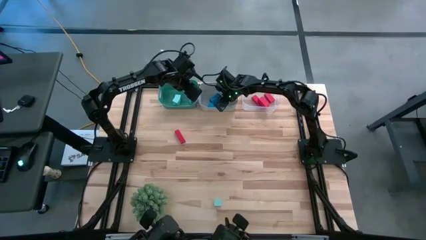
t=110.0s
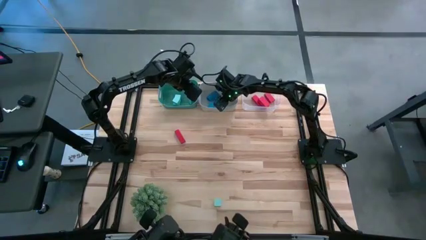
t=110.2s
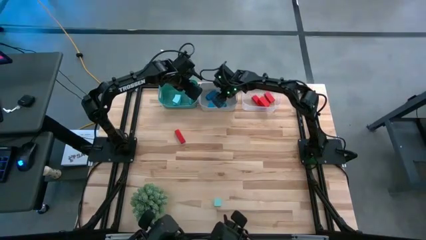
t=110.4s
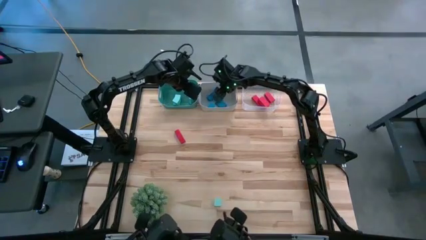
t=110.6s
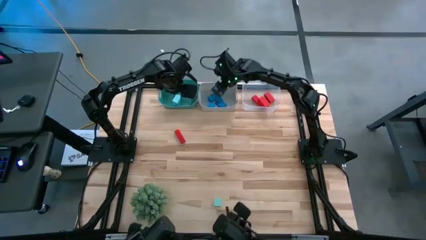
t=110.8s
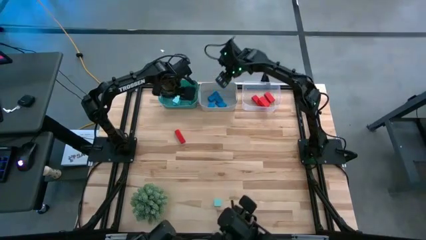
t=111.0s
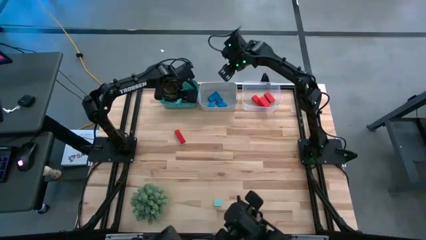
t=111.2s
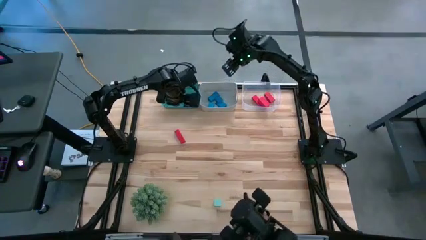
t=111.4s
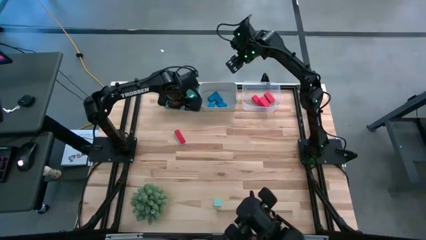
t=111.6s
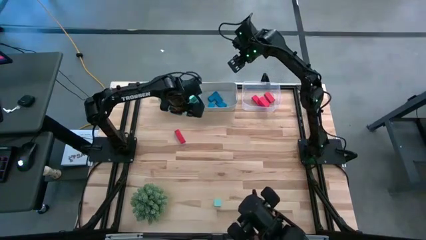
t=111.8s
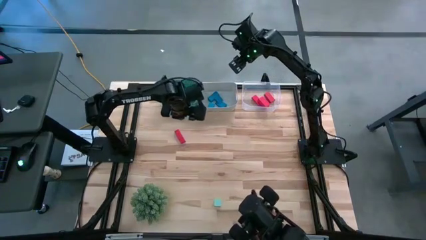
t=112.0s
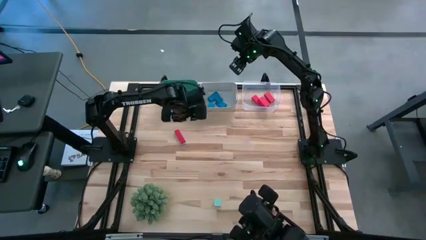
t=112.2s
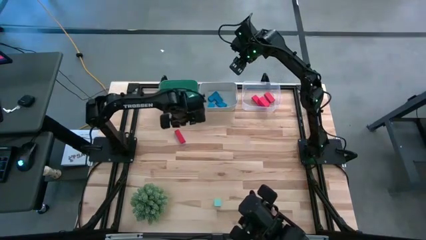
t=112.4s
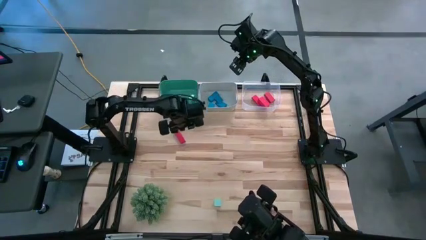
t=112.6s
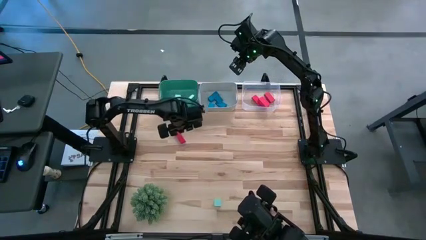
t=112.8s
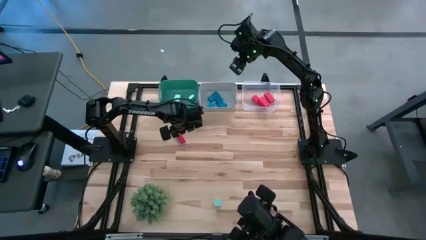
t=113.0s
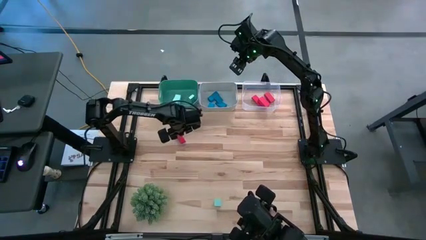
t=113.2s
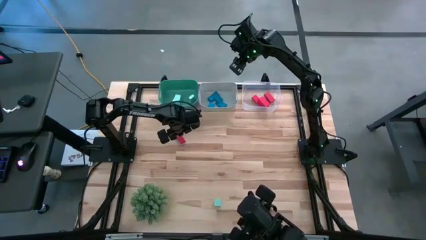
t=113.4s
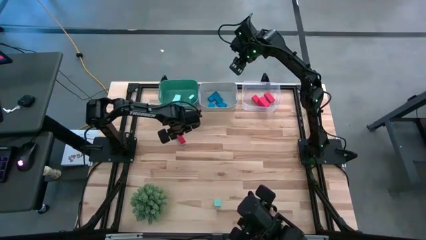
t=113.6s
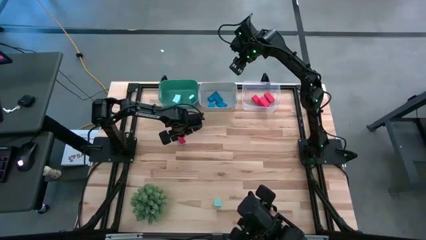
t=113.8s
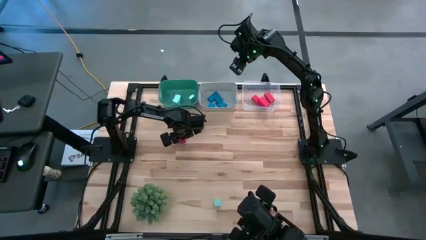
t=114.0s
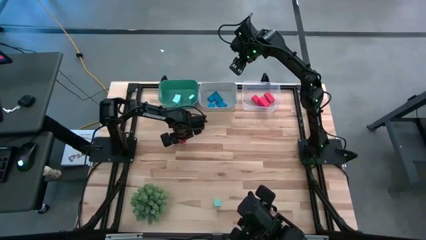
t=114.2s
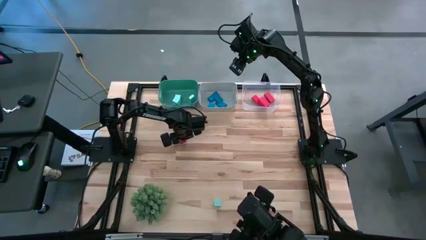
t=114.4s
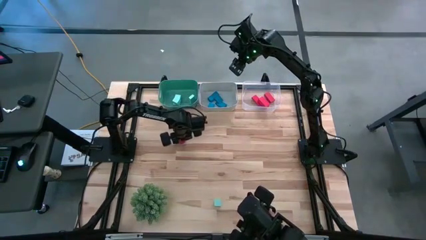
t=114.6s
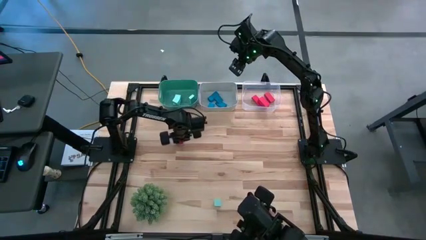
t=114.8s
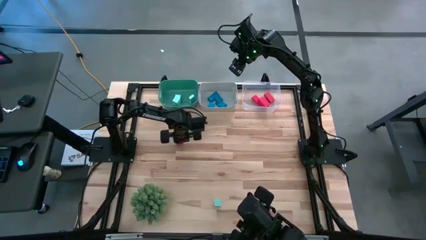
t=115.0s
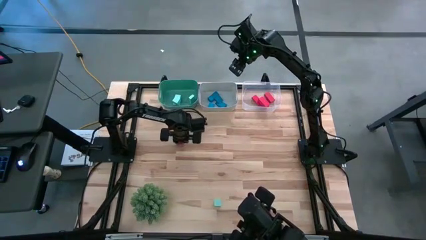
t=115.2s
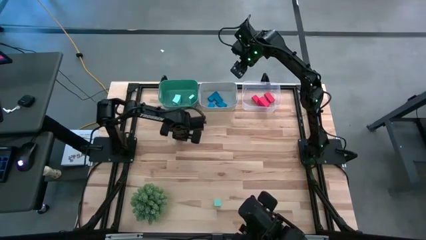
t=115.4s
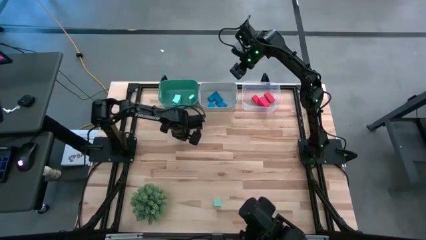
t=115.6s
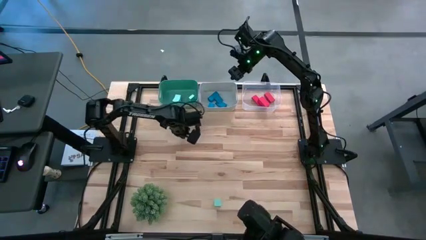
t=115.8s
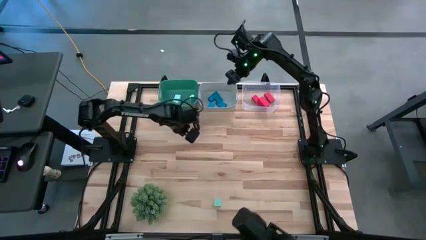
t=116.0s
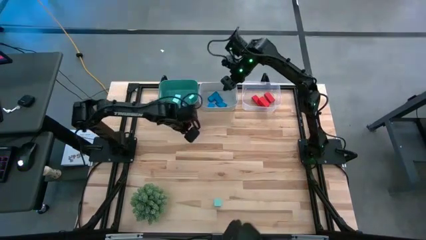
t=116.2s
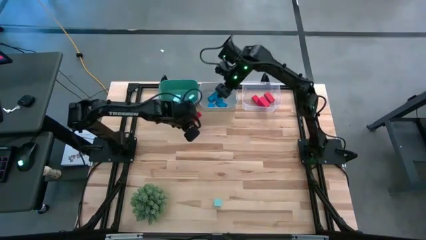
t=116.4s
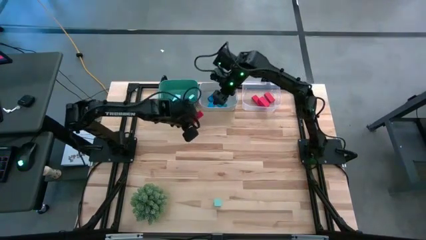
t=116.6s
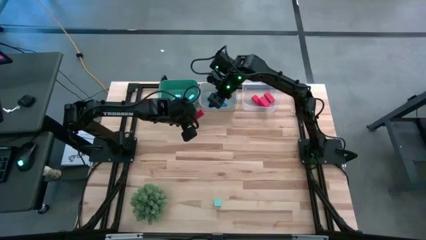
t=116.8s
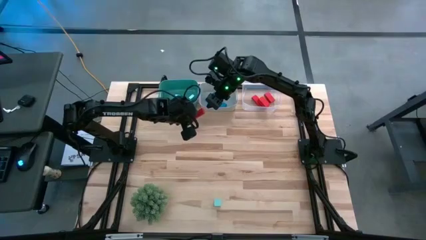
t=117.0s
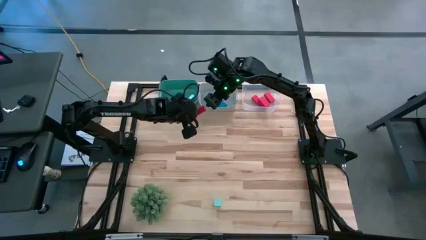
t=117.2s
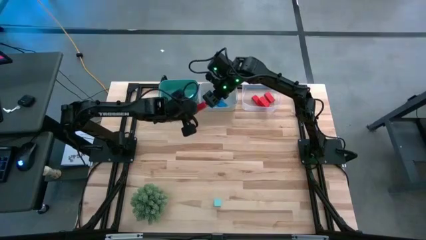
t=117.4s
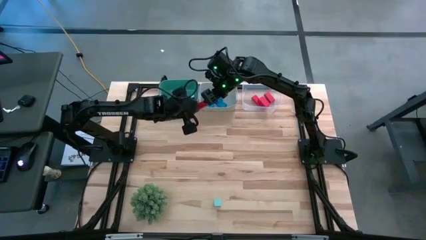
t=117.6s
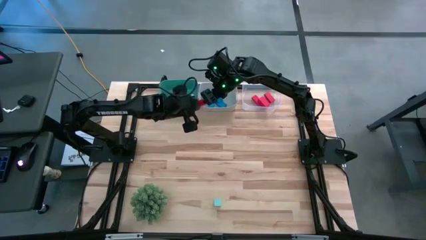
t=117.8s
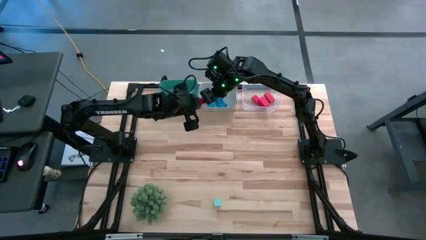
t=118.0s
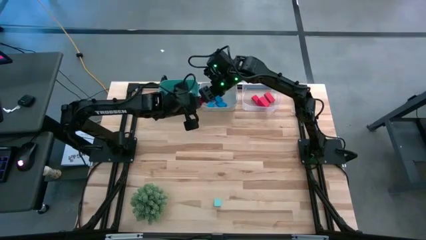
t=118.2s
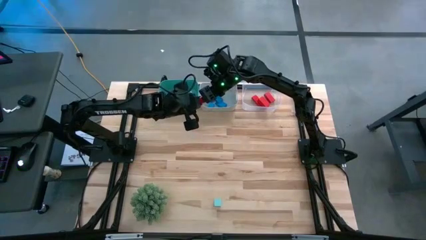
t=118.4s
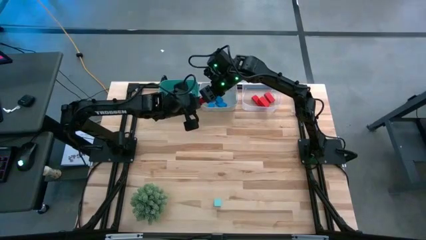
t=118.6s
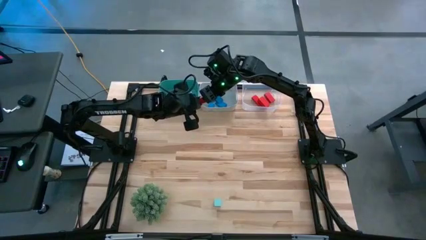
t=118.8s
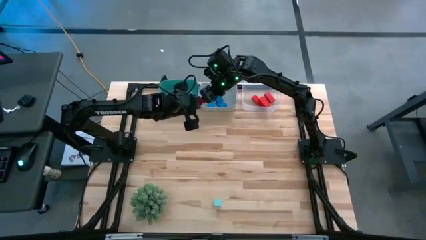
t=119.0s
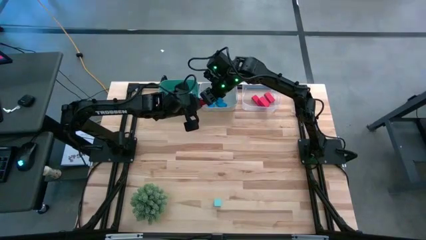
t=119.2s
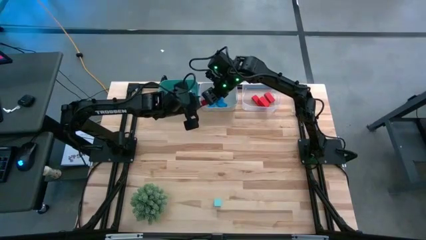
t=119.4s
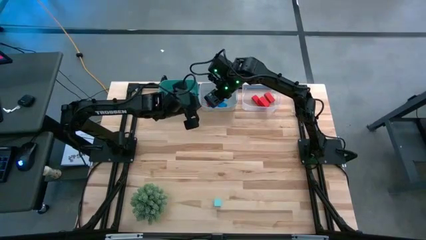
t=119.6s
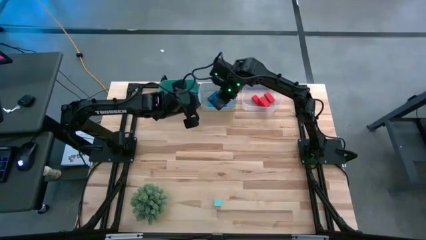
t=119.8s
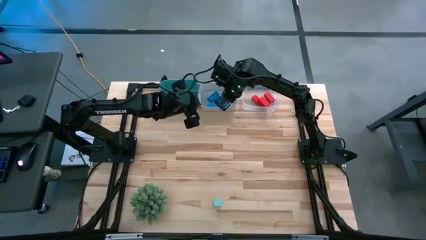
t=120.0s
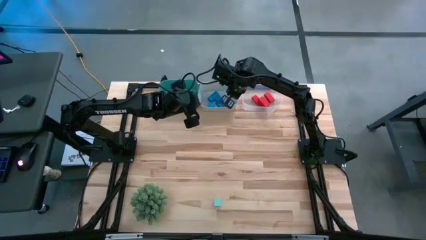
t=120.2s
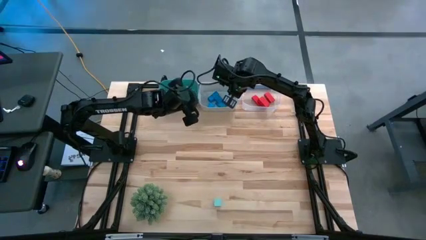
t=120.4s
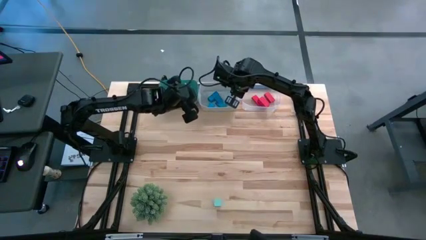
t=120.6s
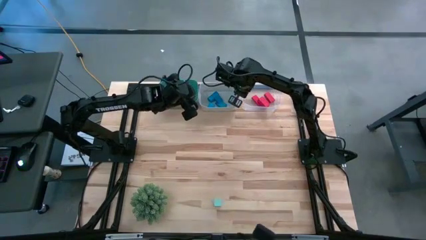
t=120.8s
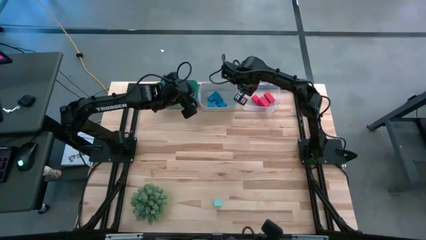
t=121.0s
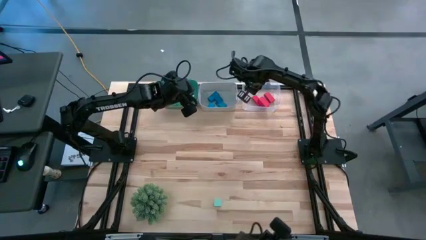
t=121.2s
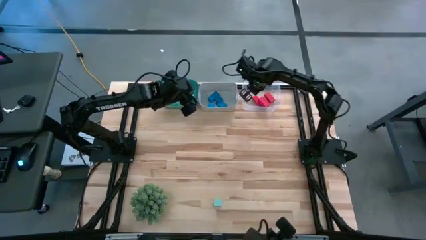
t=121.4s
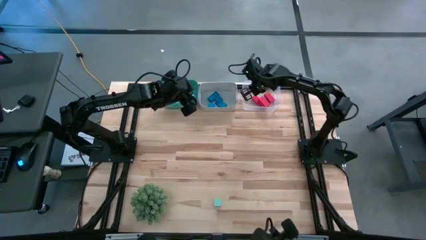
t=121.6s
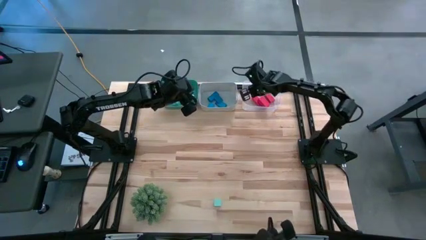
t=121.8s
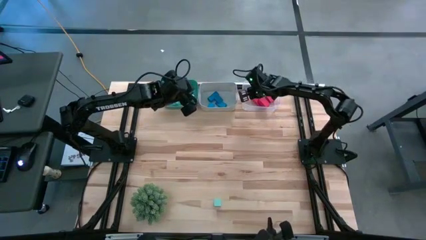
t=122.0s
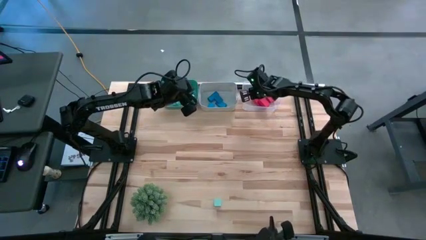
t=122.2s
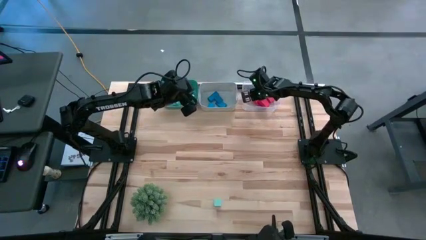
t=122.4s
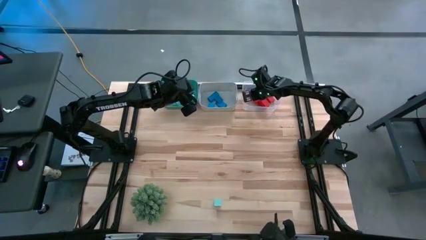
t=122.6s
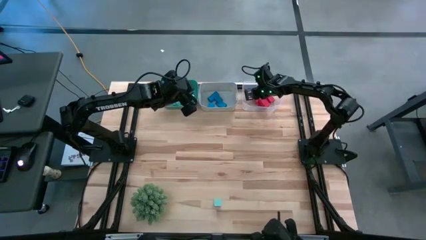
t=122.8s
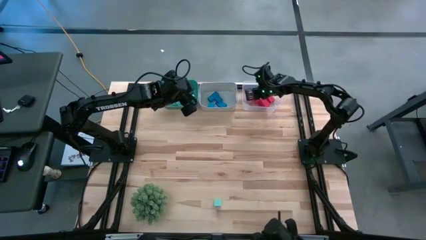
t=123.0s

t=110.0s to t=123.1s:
Task: Sort & place blocks by color
Put the orange block into the transparent bin

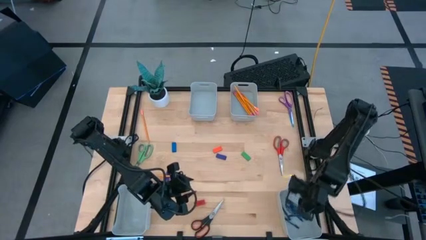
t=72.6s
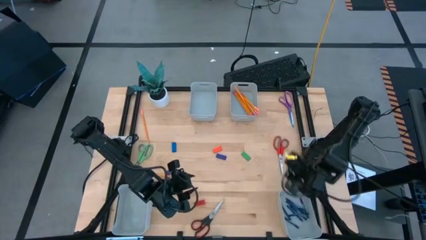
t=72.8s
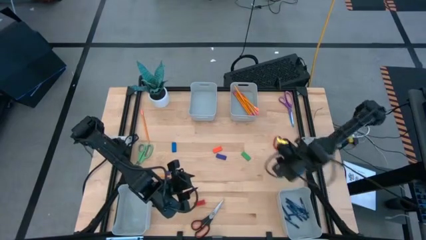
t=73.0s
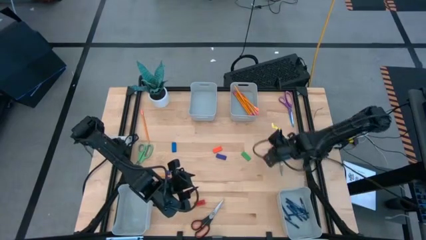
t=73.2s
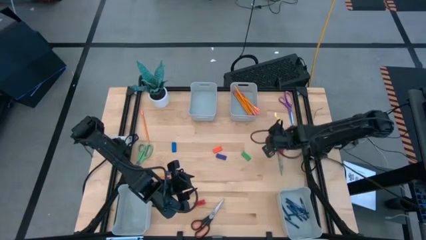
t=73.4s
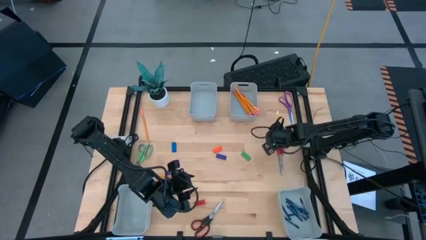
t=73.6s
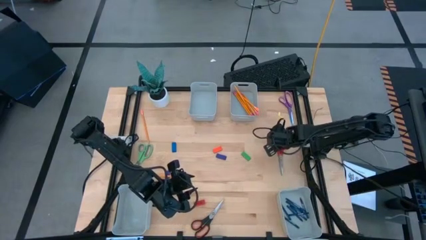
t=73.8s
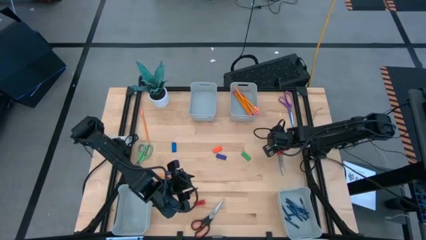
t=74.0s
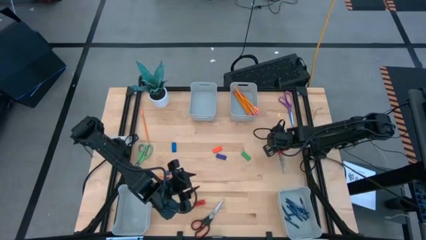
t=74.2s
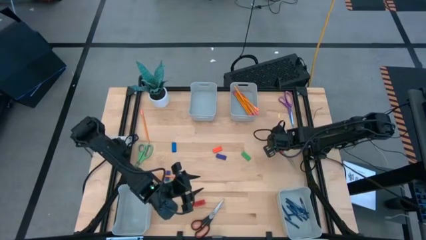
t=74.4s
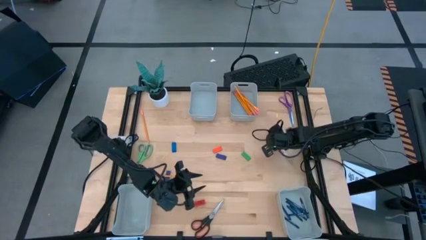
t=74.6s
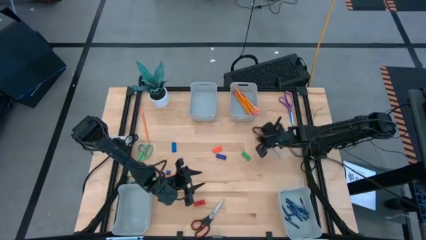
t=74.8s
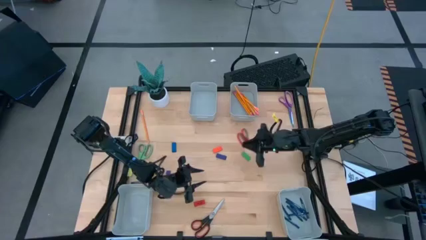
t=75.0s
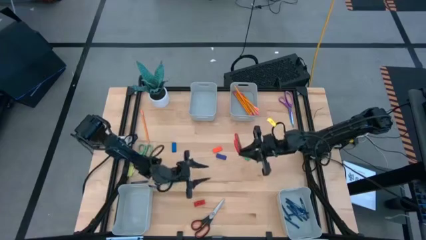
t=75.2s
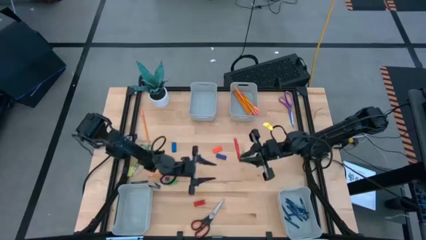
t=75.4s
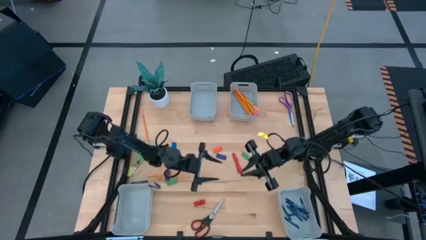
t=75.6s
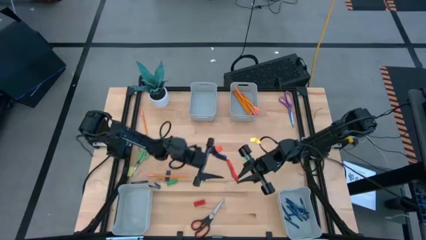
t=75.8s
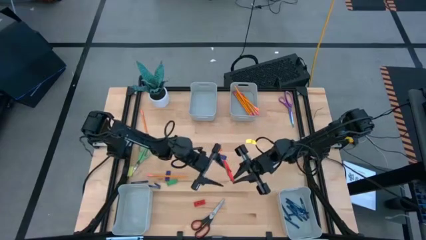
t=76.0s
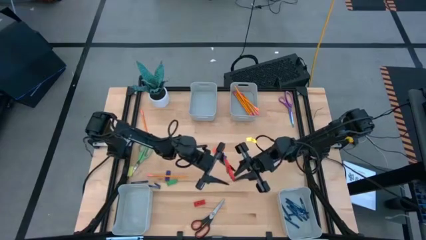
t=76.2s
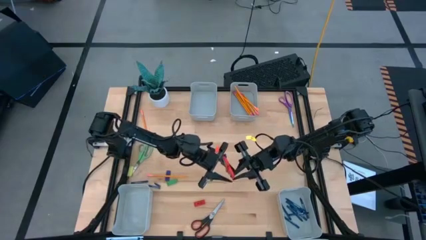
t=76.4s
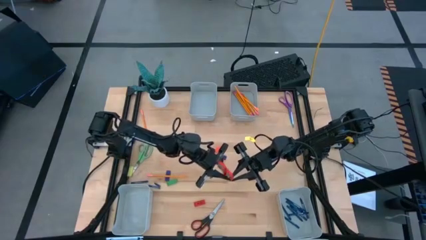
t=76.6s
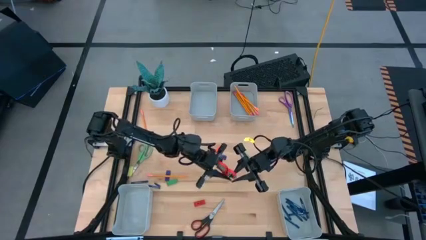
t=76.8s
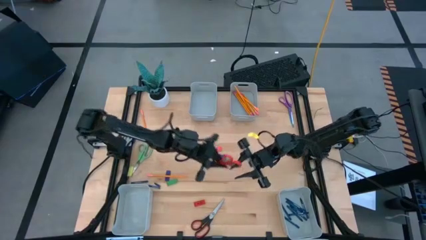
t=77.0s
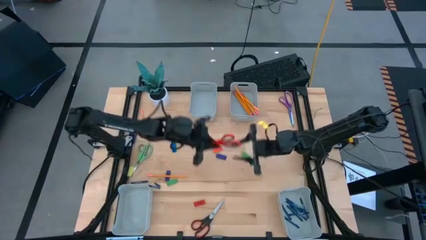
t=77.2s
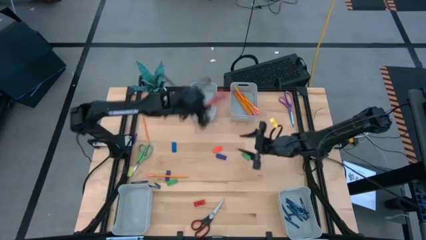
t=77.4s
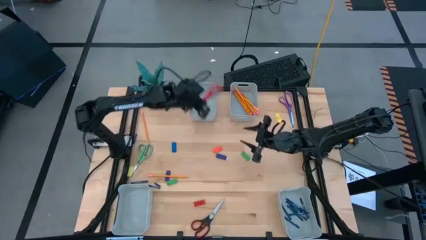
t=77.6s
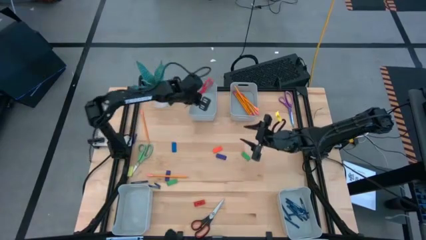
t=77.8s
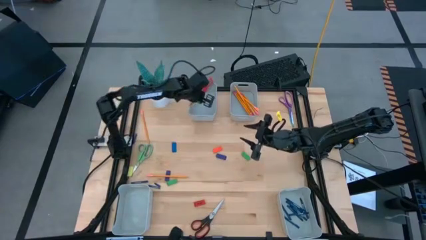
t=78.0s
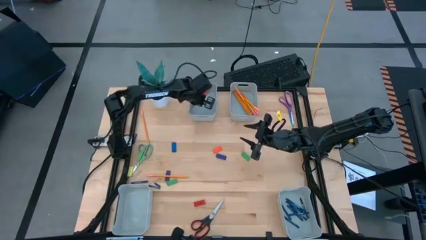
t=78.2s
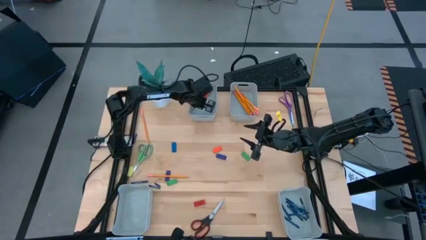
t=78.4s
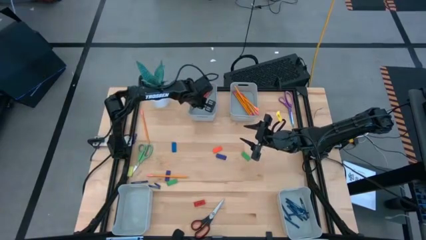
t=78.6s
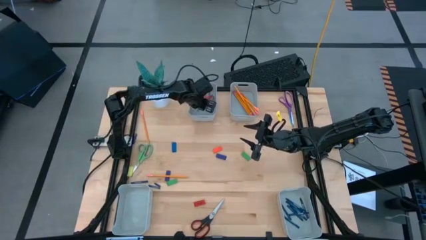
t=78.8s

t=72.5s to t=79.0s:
Task: Sort crayons/erasers/pens/pencils in bins
Put the red scissors into the top left bin
